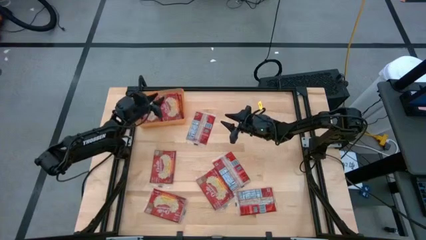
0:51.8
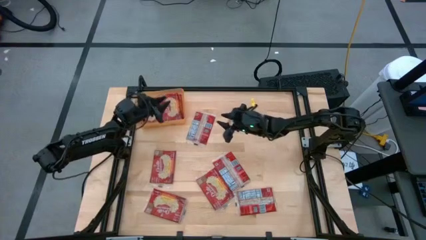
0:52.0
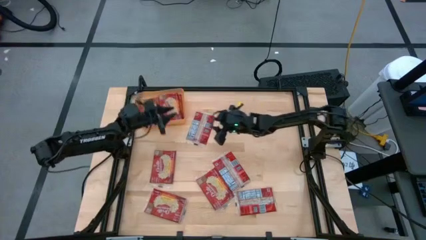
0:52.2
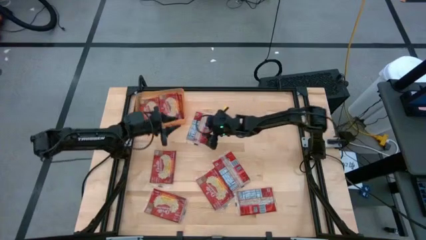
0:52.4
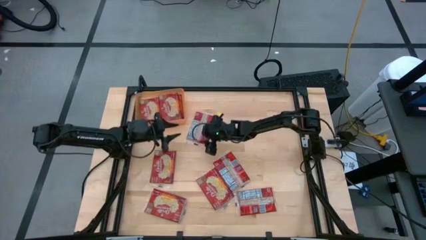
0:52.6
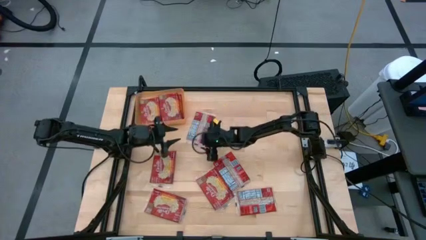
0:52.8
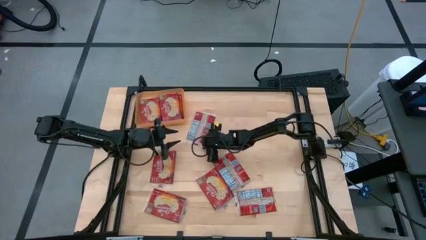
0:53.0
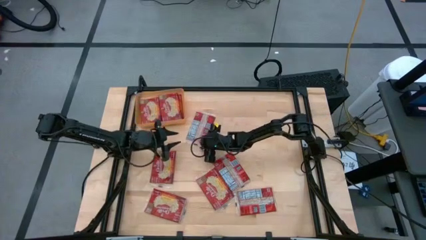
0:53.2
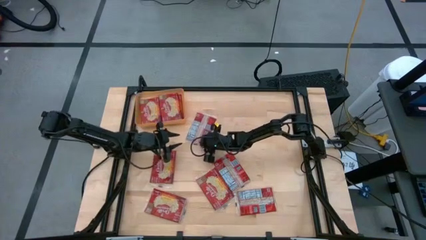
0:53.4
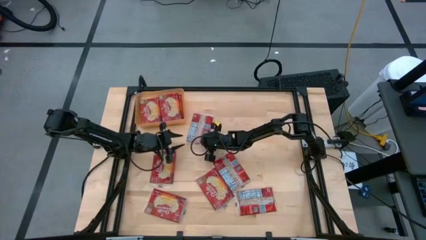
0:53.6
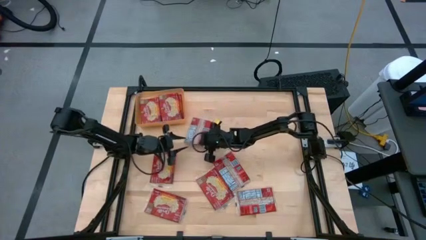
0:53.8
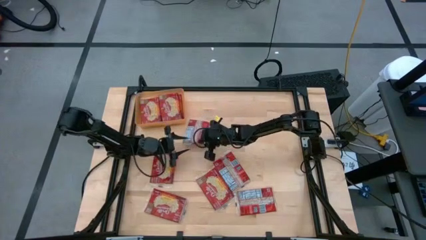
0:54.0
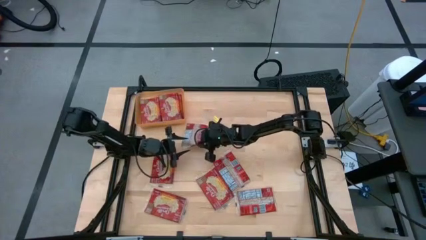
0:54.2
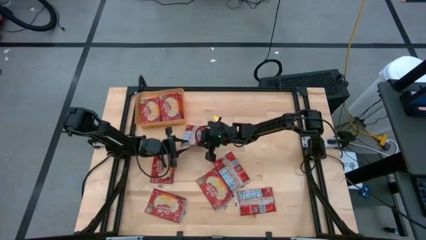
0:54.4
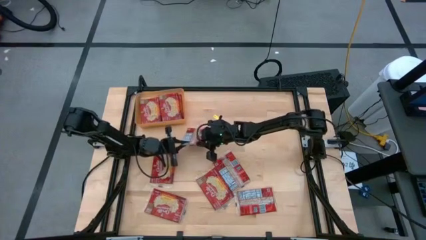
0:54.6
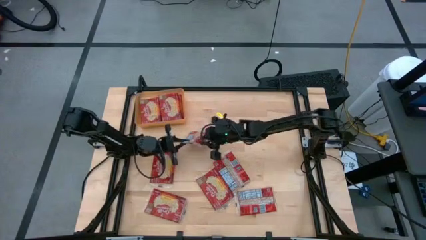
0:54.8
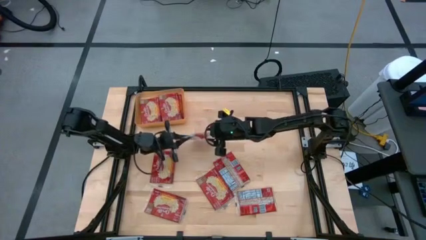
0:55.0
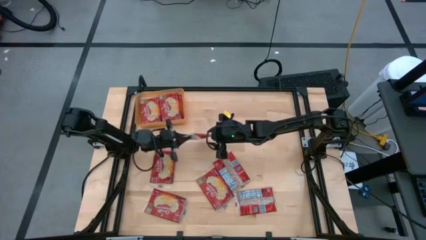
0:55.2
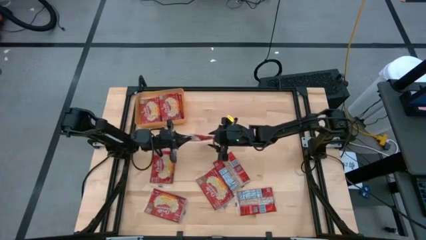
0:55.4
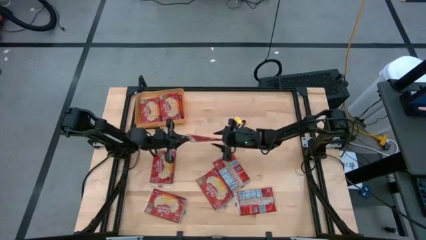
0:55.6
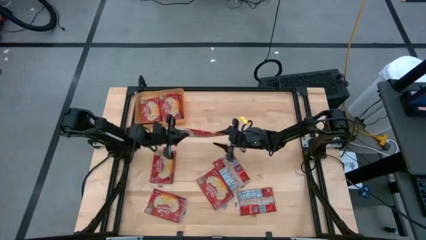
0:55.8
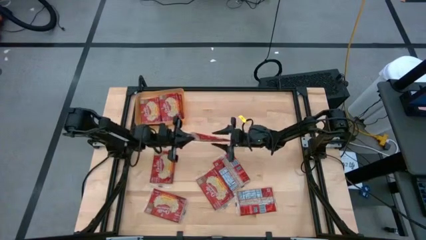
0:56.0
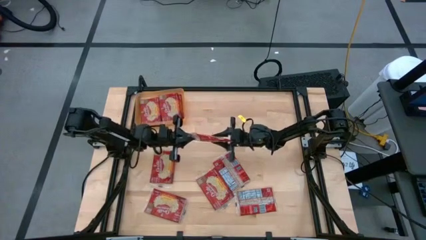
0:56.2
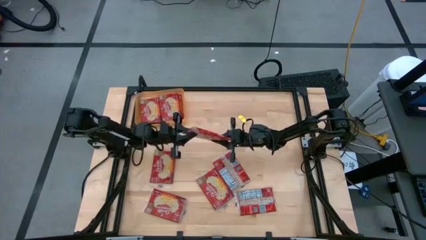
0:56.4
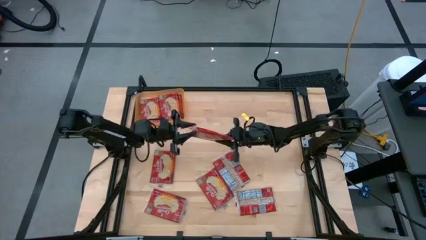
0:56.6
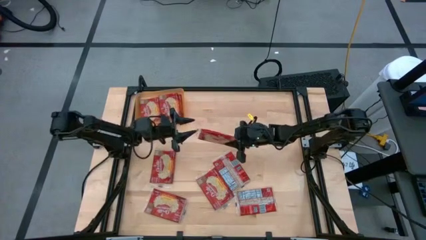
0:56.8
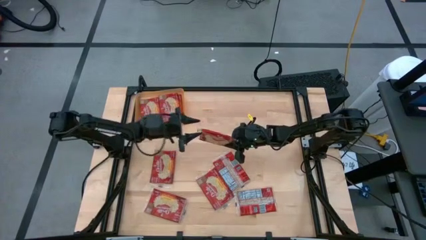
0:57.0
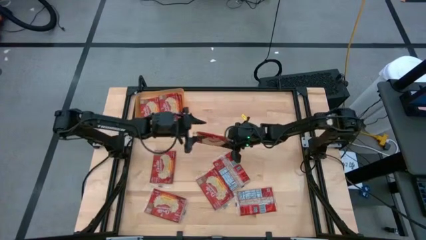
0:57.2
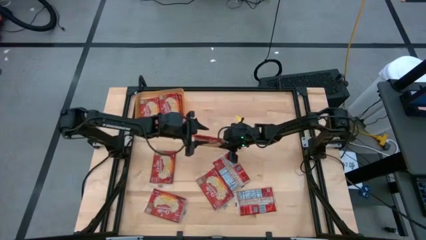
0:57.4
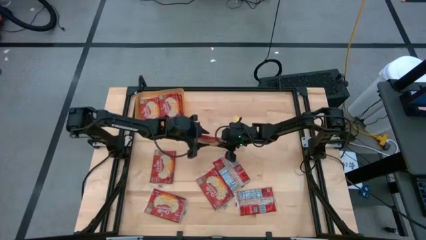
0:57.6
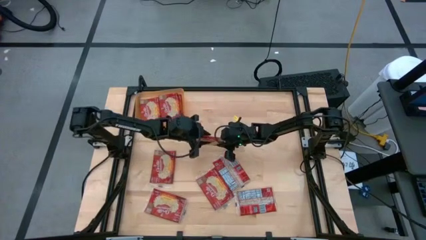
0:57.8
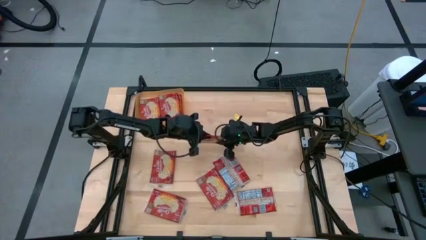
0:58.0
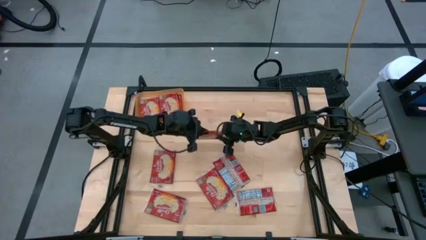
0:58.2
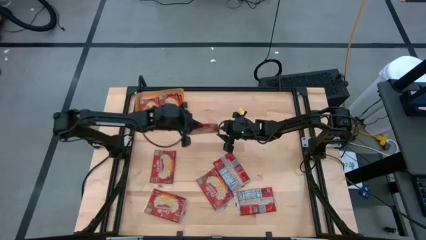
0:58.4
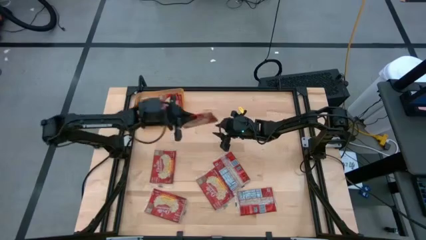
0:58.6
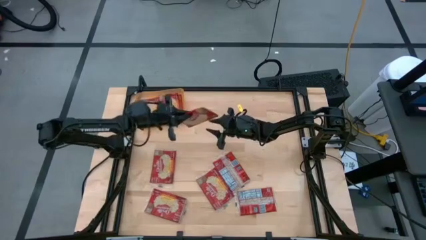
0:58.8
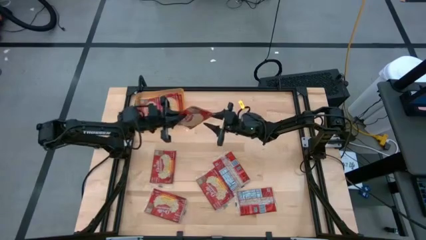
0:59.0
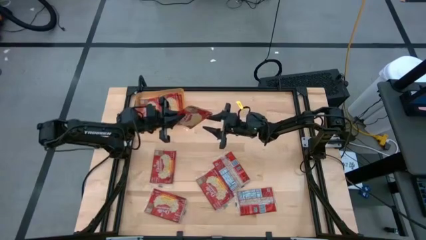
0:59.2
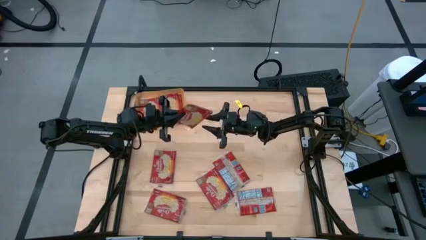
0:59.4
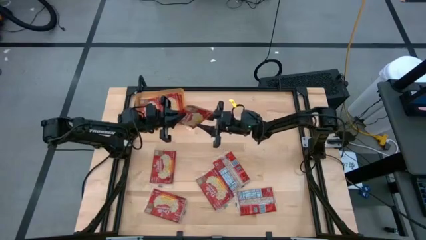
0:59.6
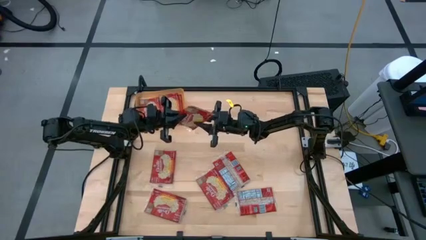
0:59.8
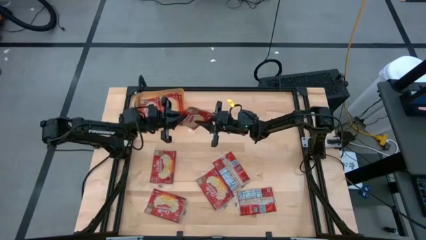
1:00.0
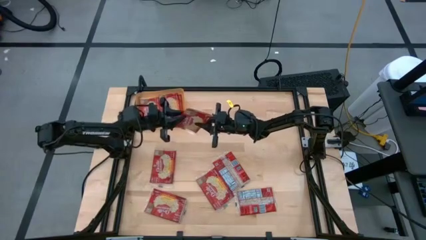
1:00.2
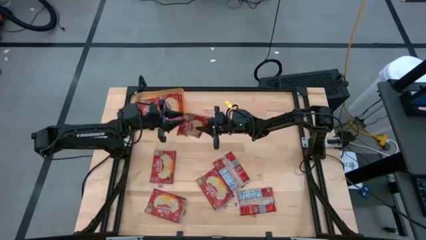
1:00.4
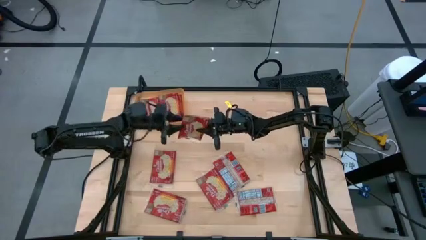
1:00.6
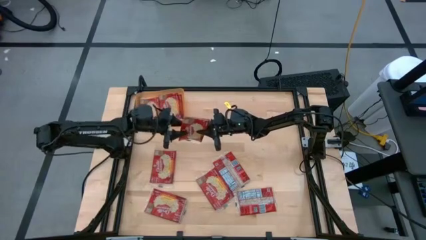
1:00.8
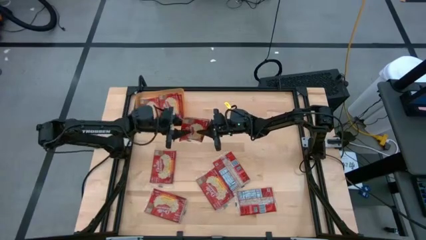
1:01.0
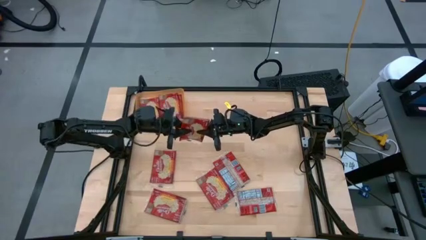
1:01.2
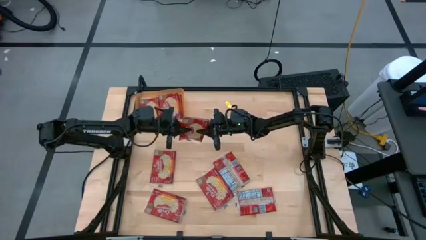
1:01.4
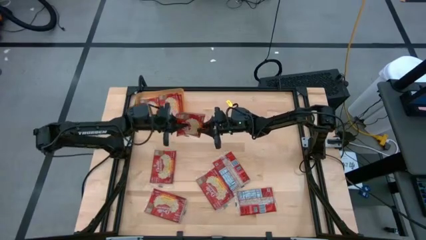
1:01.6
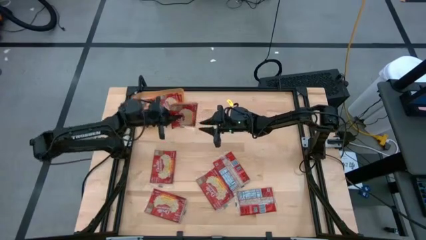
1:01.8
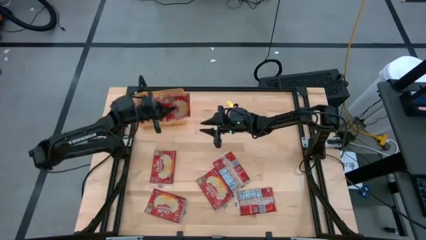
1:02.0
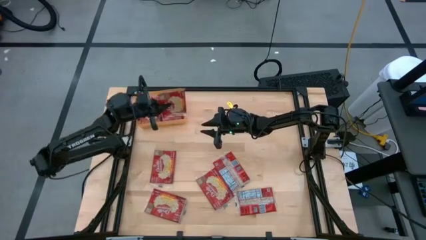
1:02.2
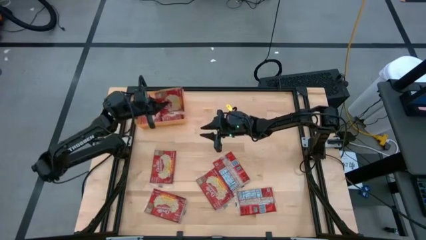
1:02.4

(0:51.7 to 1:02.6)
Task: Sort popcorn bags into baskets
Put the red popcorn bag into the orange bin
